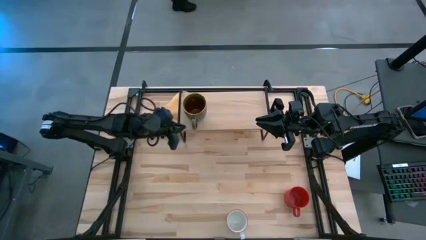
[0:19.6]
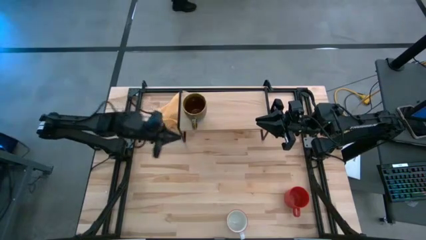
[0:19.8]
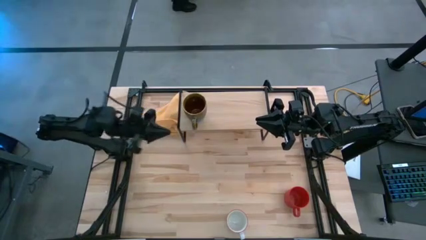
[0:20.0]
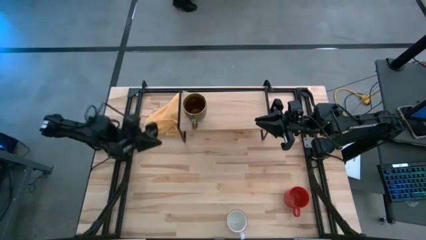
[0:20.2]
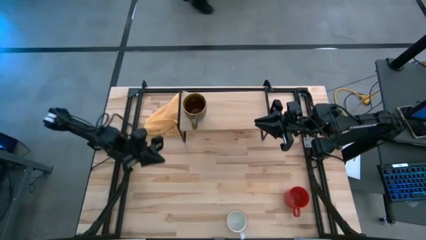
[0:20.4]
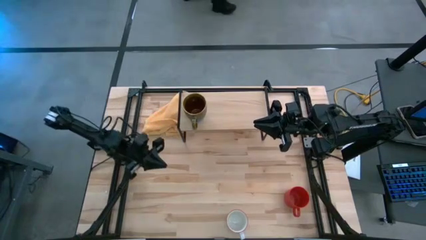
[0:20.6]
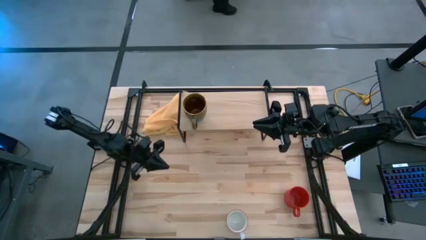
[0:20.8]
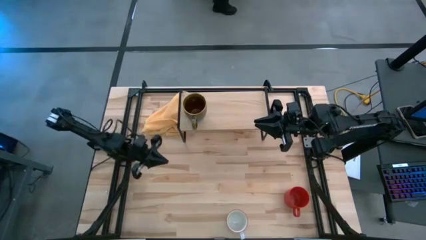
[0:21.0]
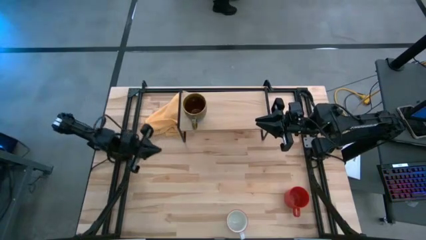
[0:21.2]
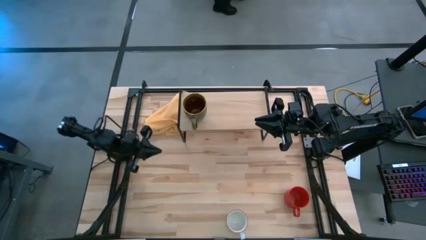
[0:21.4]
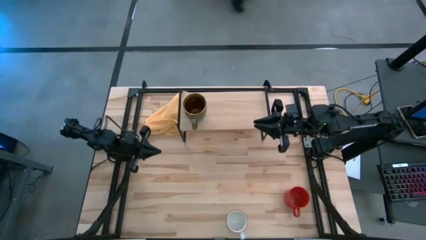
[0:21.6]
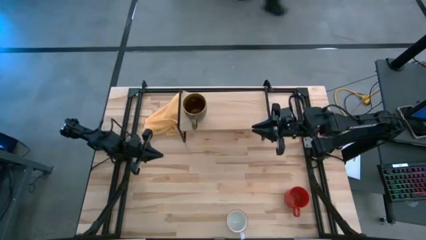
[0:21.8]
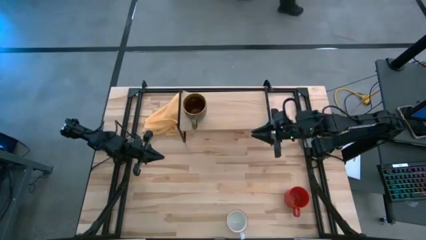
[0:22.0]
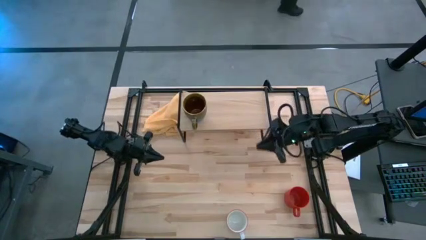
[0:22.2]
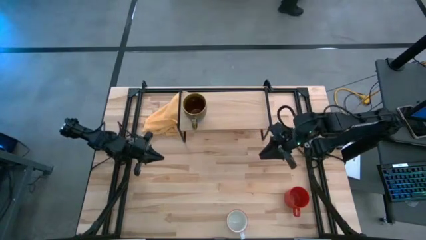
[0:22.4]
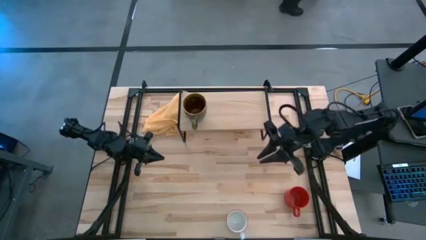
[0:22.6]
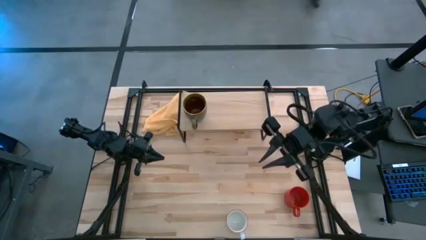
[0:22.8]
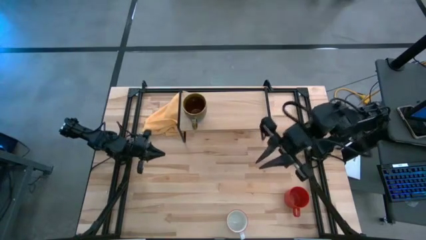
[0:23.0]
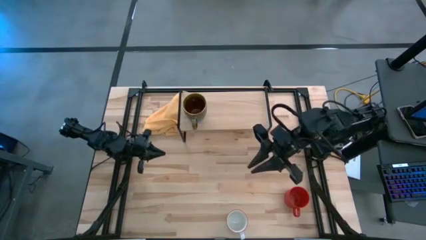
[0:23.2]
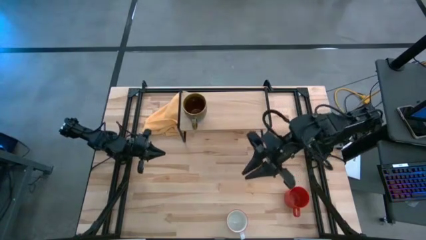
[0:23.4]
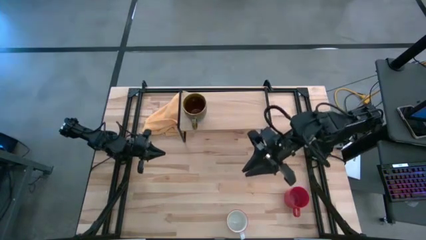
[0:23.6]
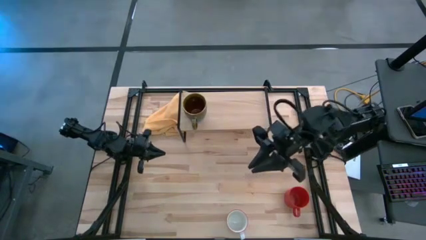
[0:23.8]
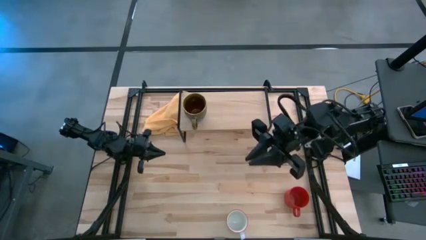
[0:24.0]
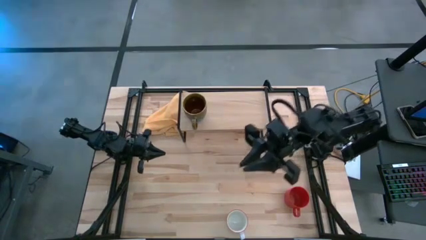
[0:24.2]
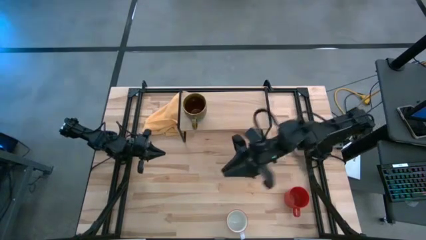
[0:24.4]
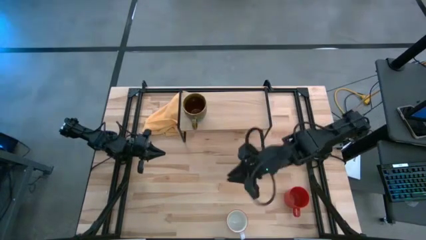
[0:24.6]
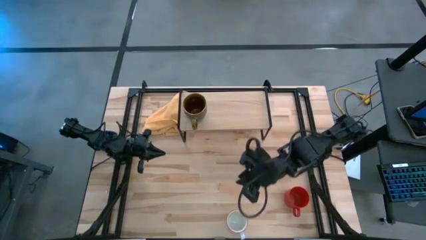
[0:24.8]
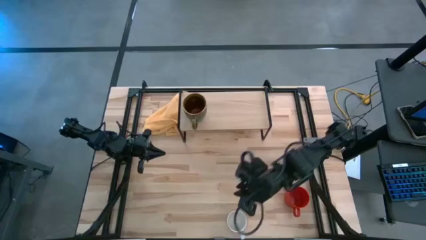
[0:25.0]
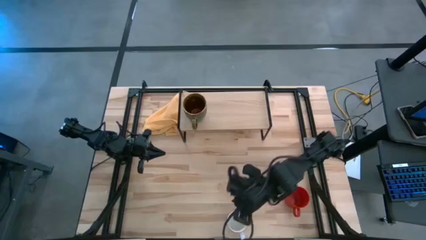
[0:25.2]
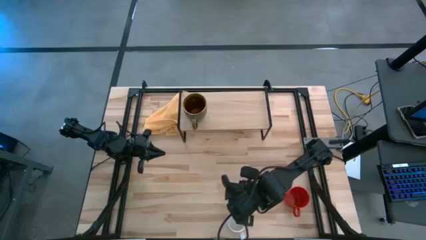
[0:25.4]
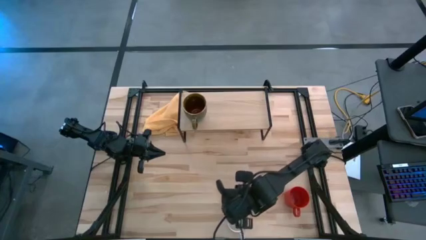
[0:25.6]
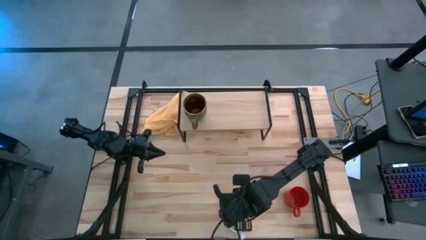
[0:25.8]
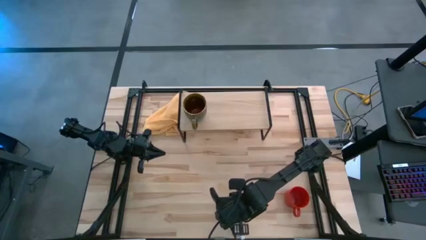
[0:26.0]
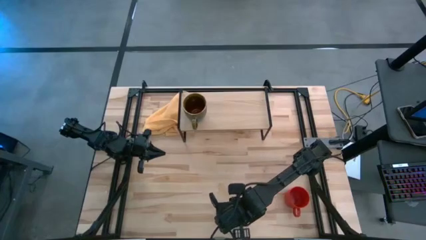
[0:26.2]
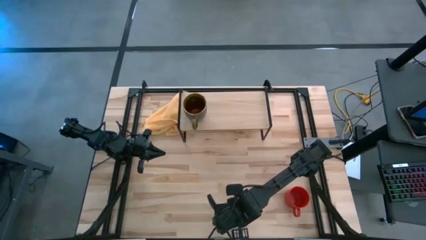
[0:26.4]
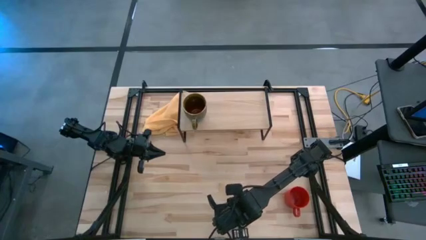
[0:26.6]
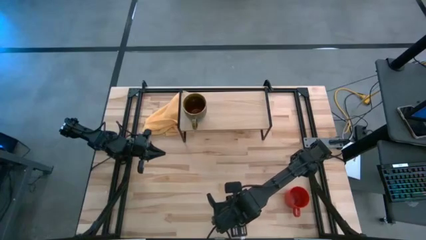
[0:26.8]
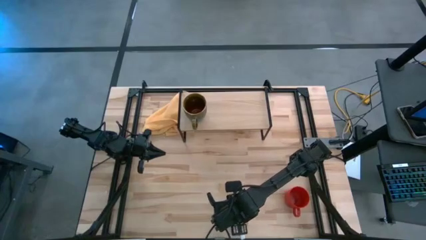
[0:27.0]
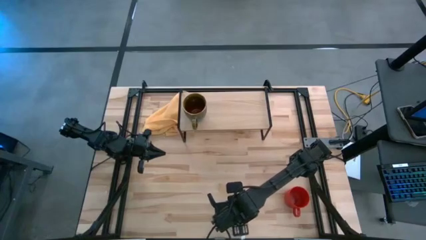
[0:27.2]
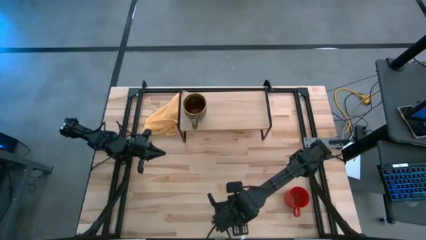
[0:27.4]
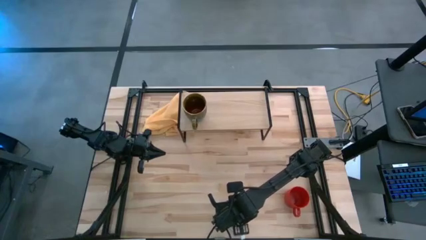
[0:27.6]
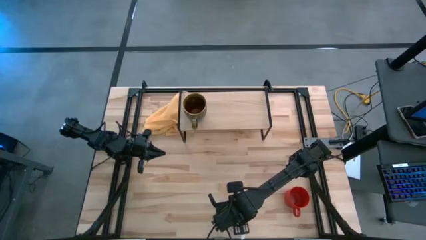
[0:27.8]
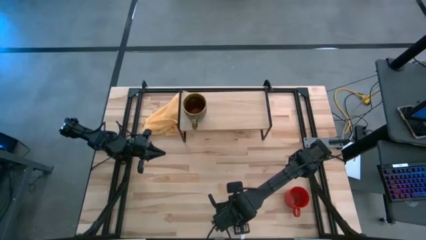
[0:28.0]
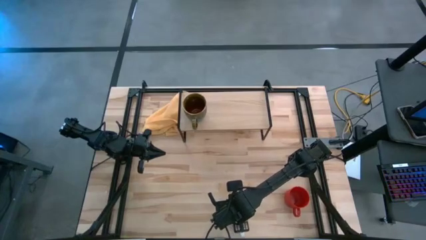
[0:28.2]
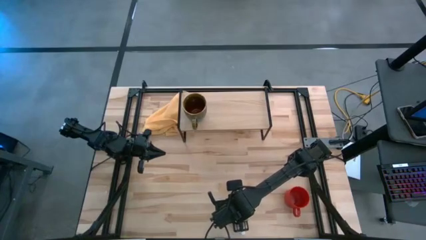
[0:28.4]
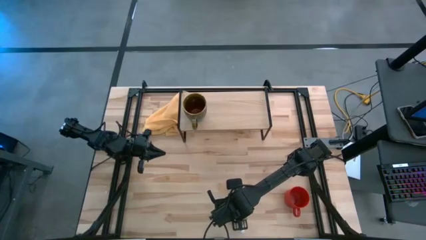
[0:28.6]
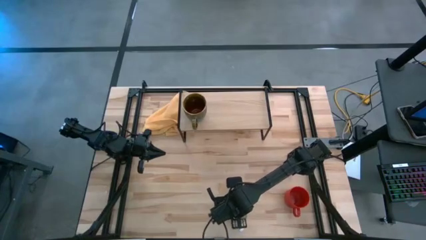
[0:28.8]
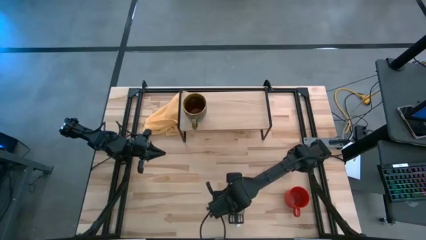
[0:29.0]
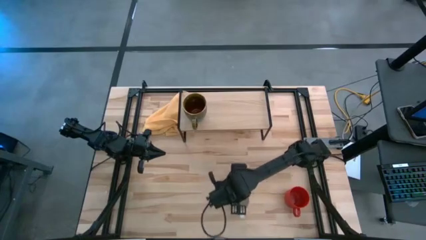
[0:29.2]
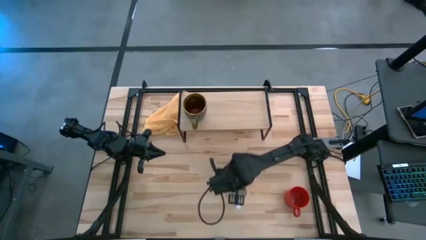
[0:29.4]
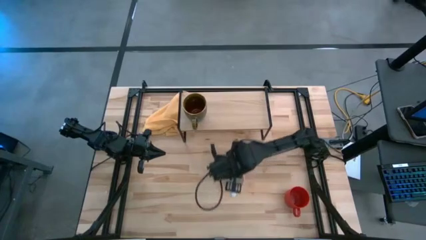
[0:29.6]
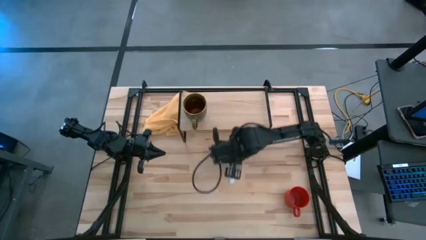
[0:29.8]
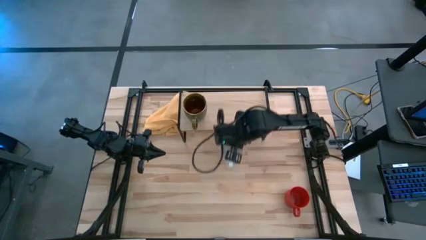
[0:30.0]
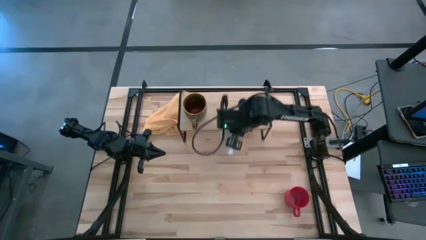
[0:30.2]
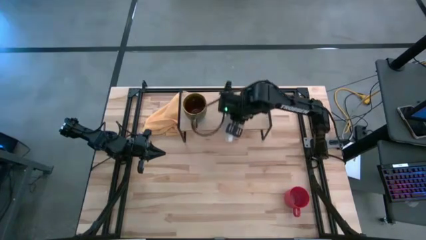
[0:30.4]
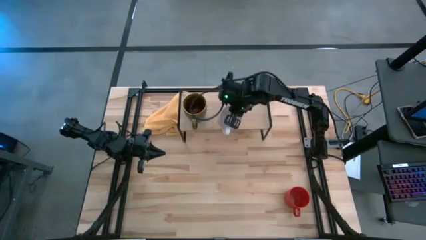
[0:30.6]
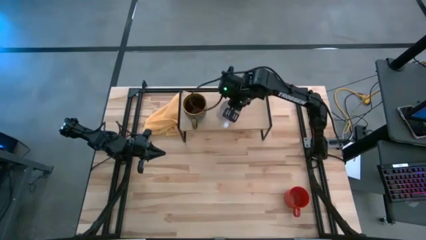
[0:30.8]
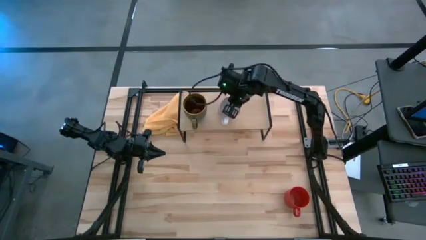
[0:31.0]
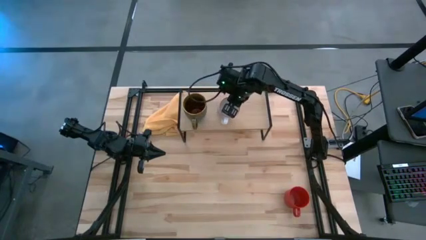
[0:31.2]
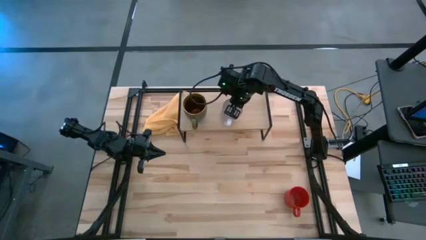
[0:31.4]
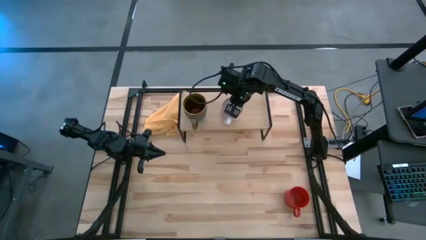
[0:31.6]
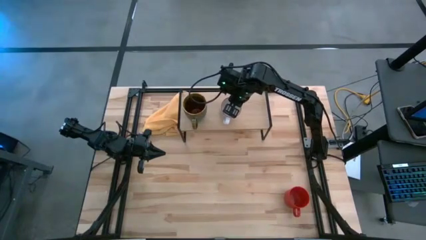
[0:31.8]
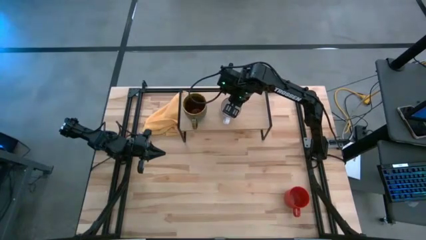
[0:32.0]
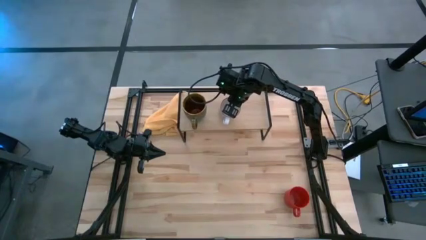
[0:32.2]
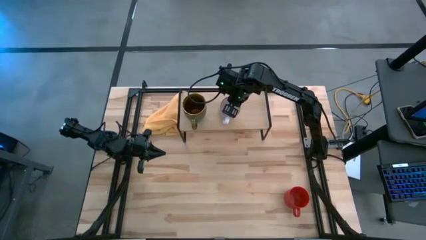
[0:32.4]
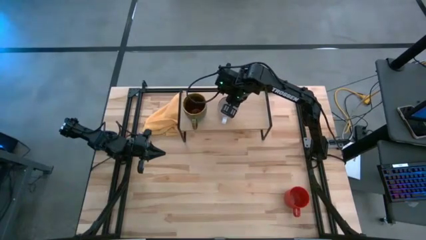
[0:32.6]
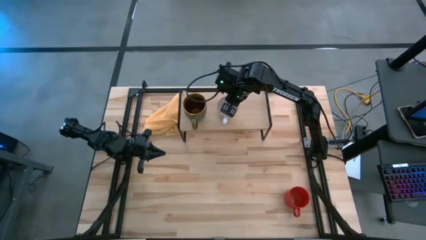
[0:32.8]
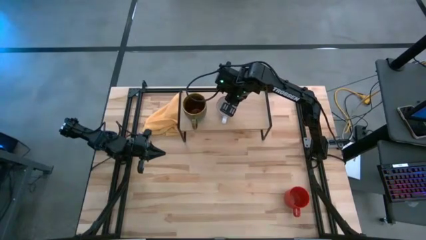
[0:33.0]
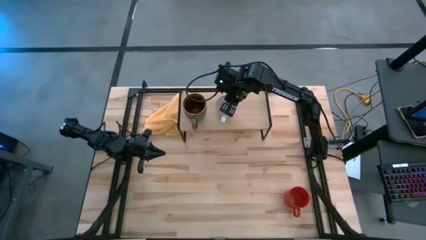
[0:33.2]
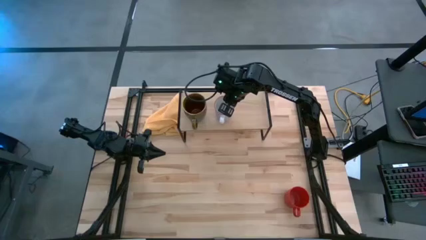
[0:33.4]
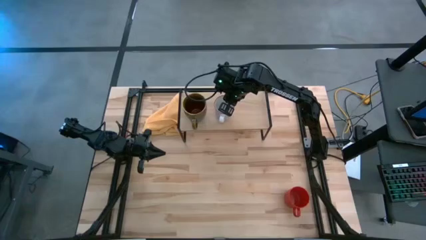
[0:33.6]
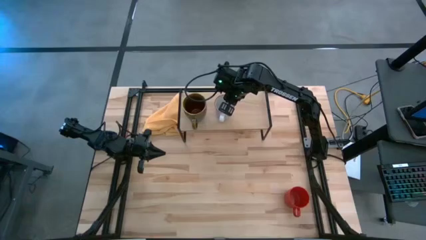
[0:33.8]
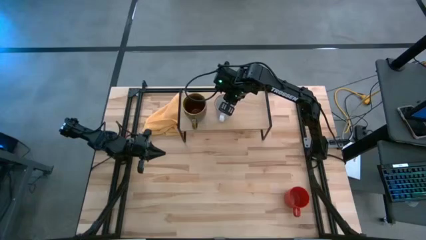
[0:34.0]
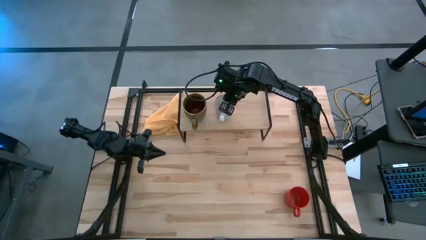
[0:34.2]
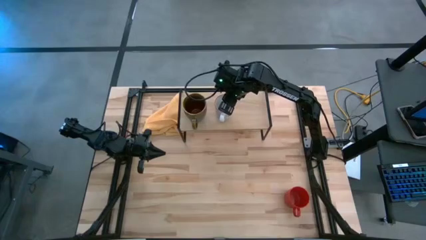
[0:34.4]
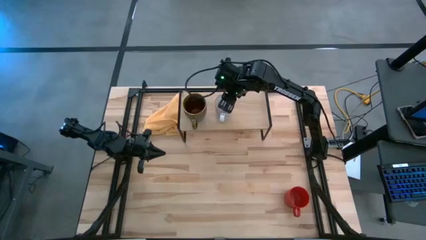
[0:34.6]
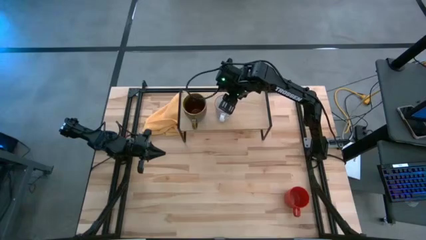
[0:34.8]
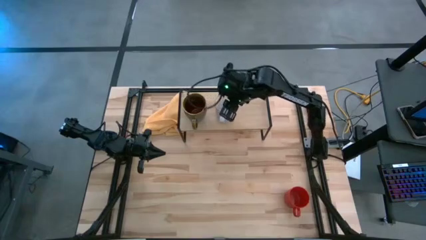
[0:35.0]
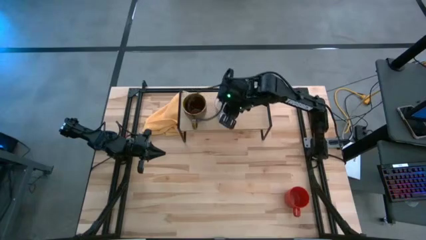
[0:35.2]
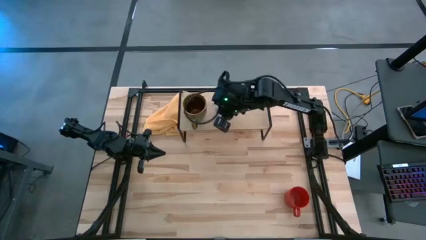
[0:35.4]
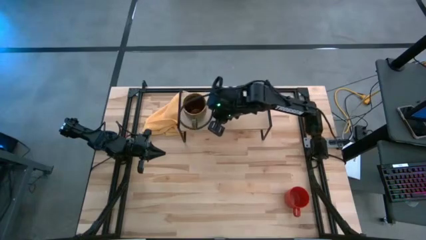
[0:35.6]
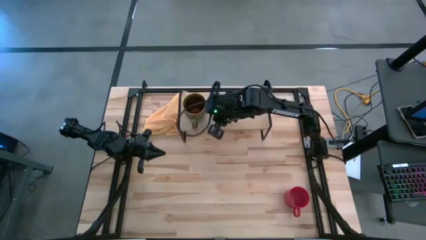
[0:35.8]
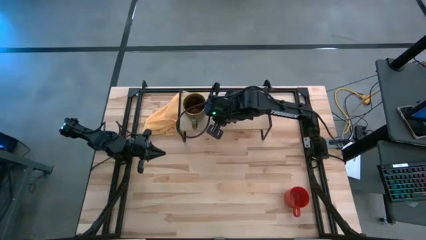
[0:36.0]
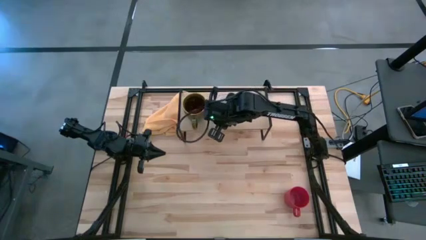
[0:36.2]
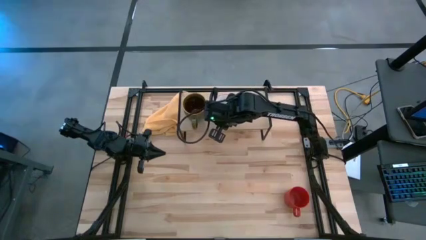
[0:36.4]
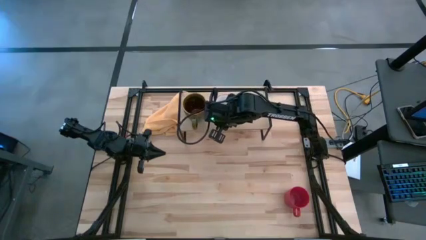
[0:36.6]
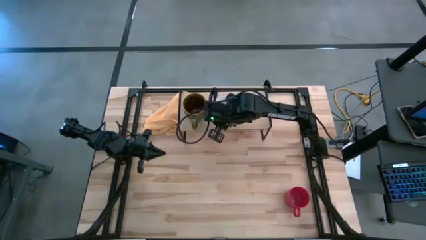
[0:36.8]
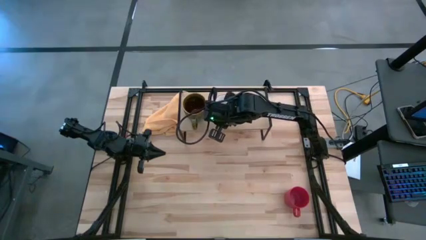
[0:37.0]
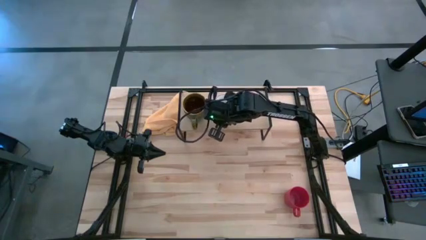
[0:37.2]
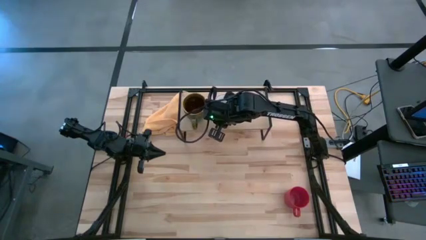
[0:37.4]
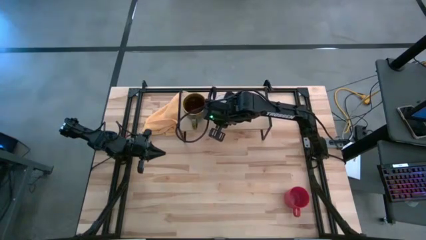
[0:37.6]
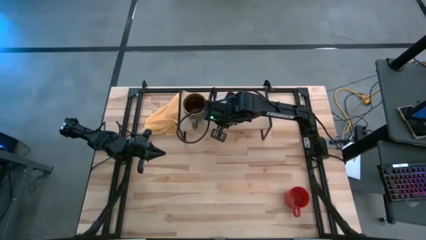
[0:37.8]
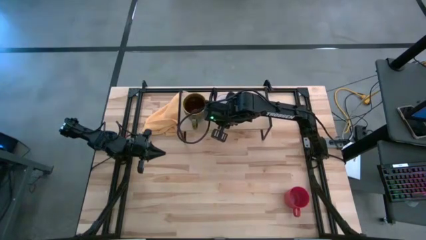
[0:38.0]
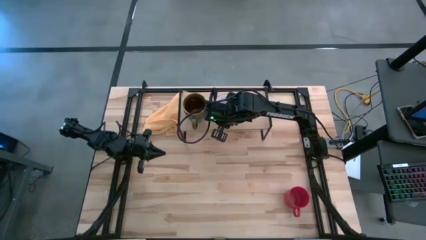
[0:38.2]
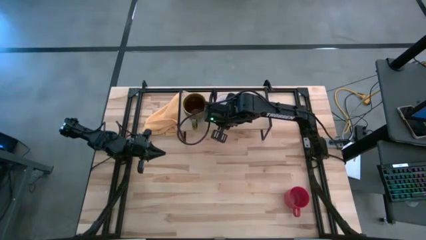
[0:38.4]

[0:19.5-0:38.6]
Task: Stack small to large cups/mugs on shelf
Put the gray mug on the shelf
